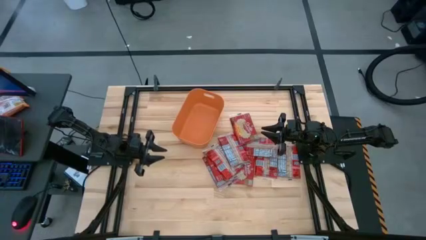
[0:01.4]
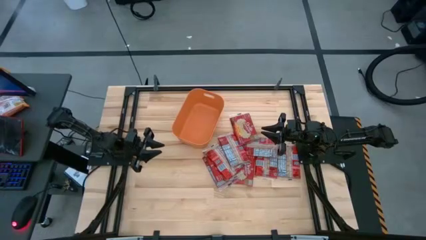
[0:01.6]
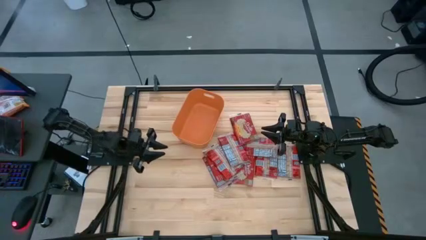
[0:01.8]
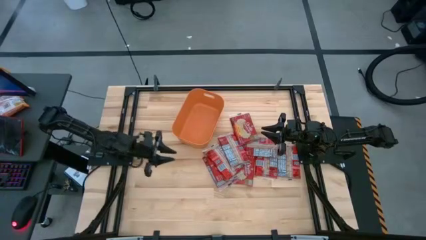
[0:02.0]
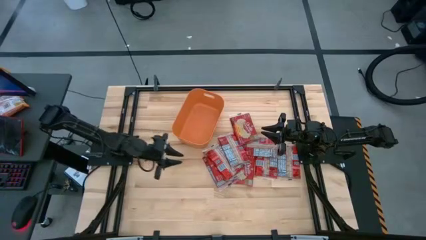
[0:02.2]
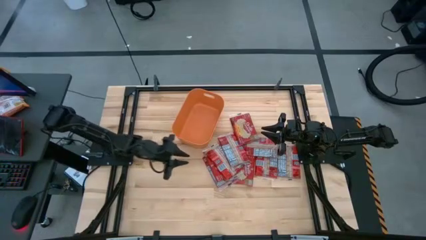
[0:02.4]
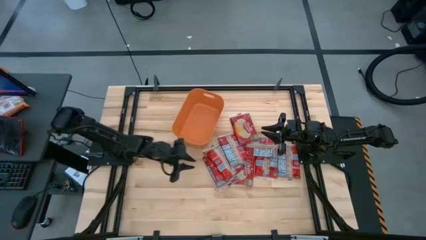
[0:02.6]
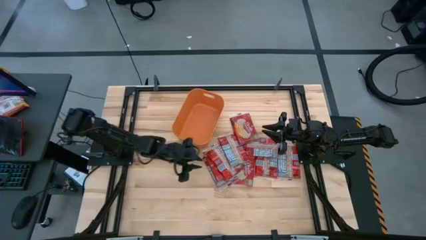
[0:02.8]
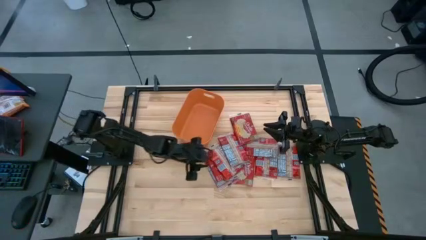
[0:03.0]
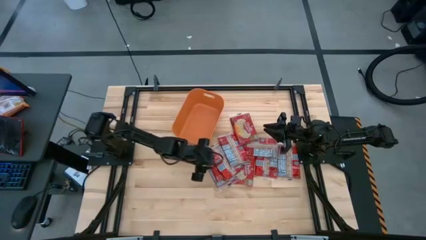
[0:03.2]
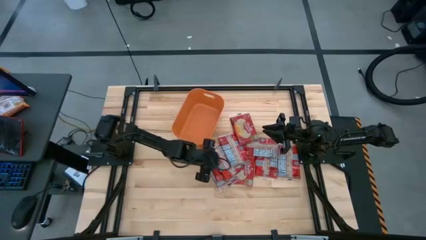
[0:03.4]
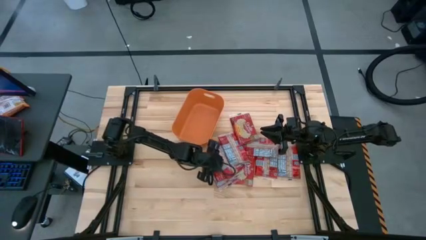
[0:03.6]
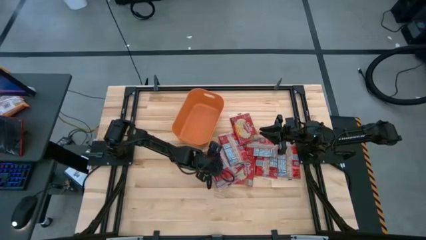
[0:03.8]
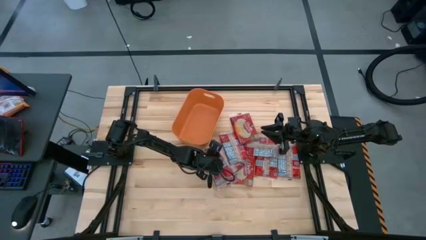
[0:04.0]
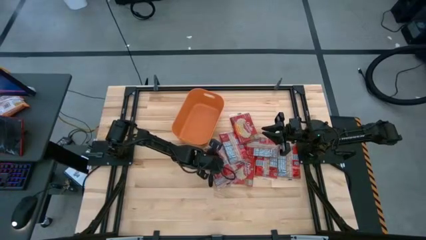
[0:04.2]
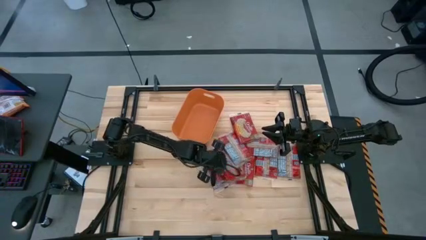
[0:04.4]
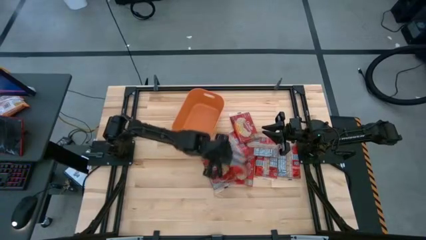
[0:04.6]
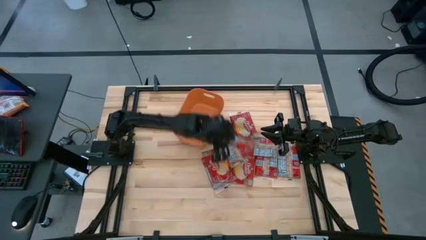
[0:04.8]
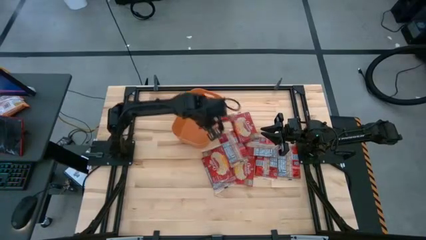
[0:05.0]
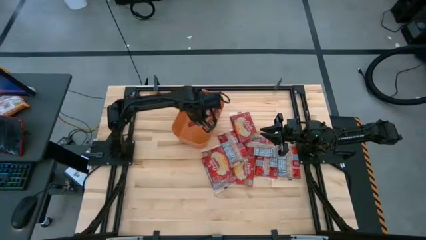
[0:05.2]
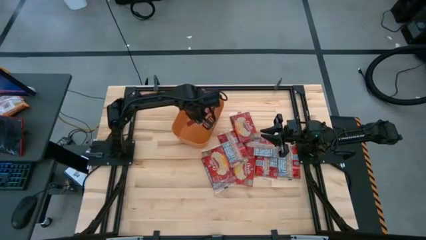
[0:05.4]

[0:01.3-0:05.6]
Task: Sort popcorn bags into baskets
Put the red popcorn pack into the orange bin

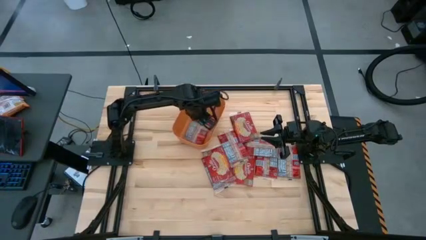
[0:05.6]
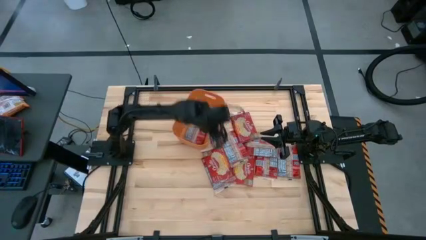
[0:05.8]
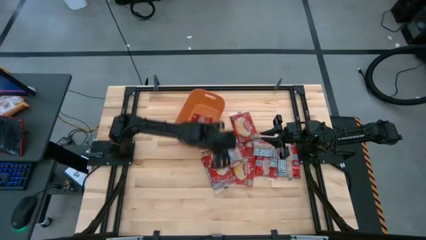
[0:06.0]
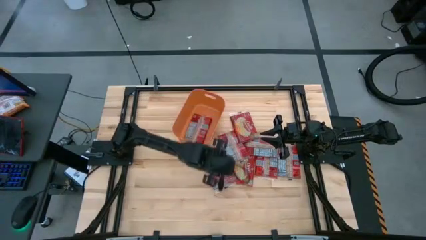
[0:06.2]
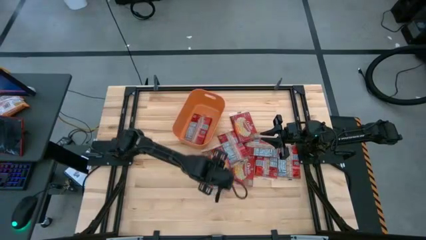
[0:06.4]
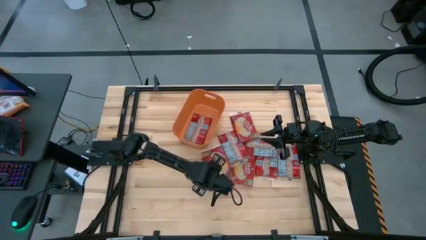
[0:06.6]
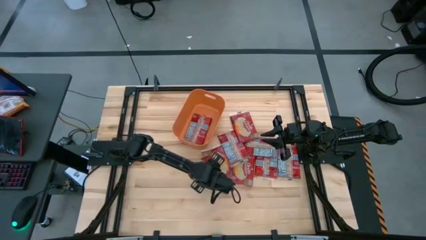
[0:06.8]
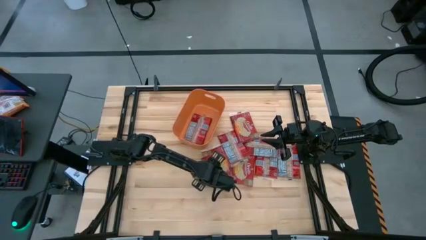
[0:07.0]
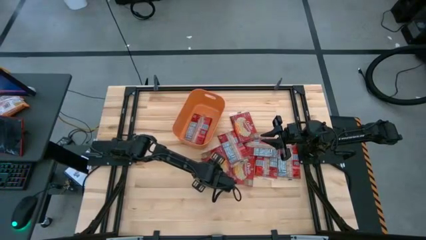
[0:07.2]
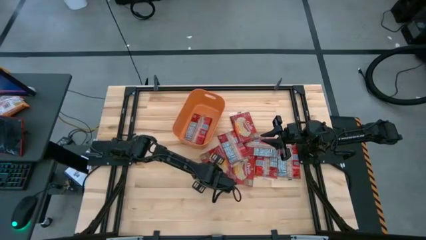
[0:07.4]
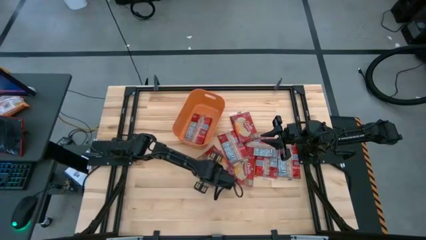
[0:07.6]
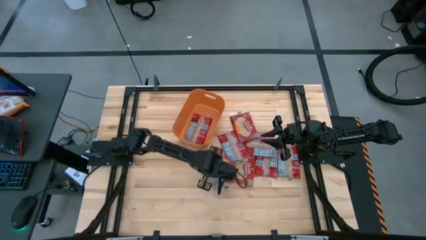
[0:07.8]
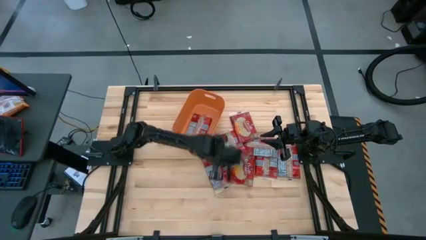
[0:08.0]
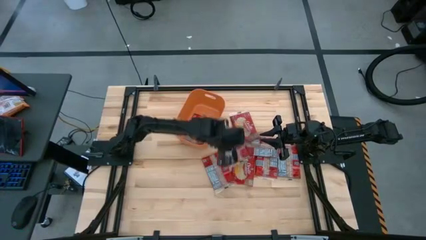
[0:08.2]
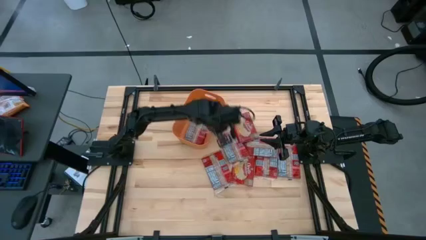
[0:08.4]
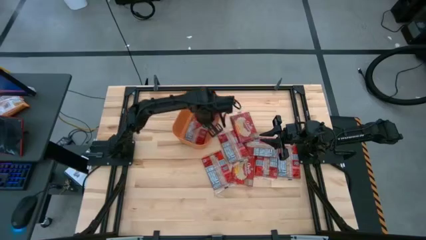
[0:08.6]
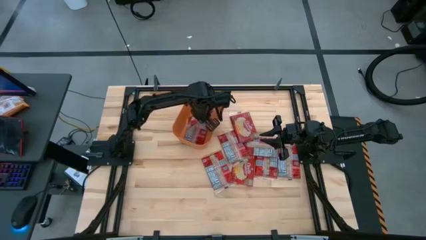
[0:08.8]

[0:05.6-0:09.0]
Put the red popcorn pack into the orange bin

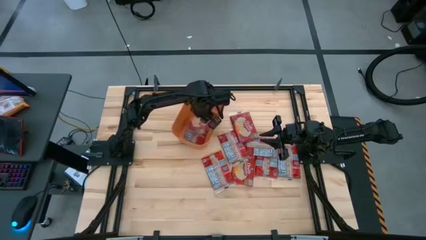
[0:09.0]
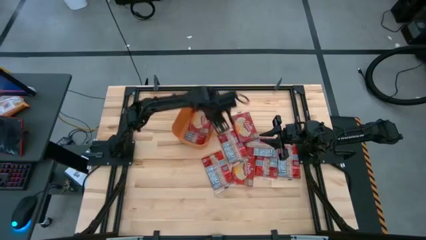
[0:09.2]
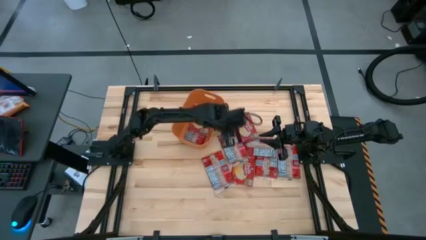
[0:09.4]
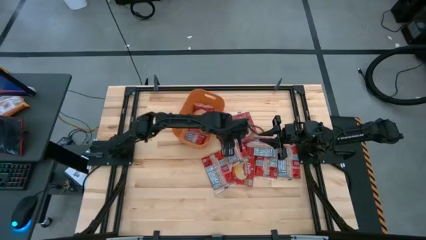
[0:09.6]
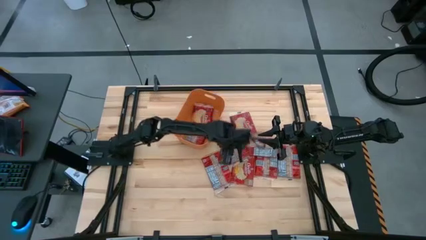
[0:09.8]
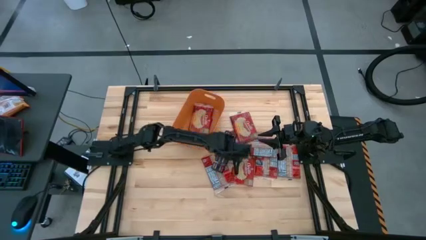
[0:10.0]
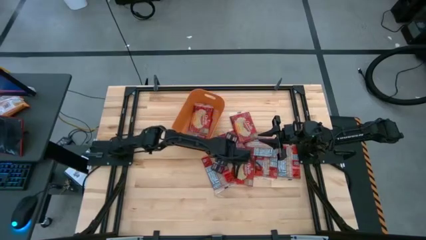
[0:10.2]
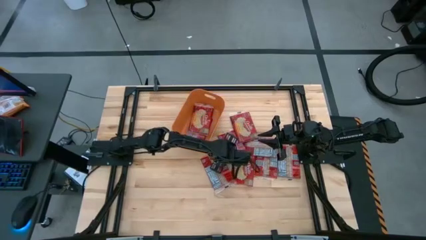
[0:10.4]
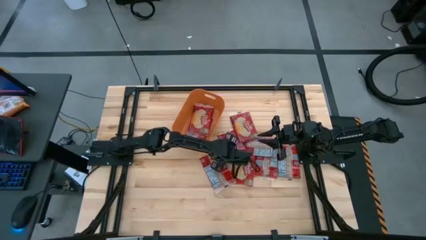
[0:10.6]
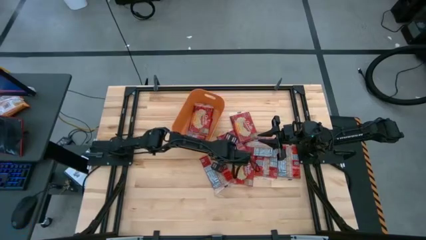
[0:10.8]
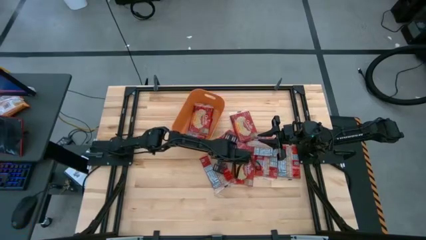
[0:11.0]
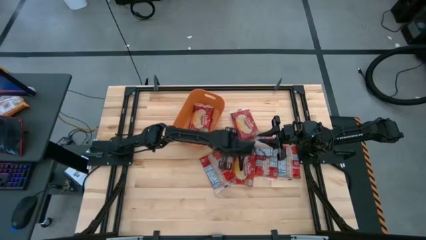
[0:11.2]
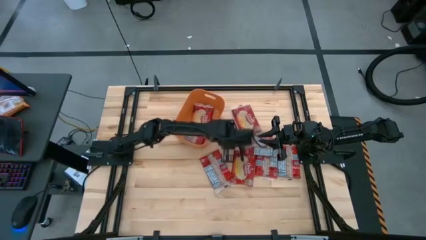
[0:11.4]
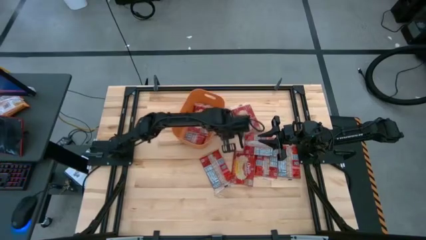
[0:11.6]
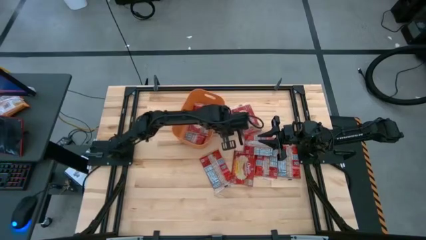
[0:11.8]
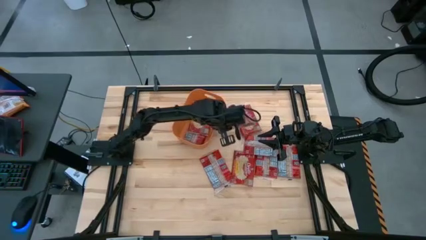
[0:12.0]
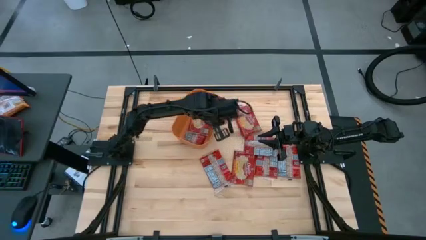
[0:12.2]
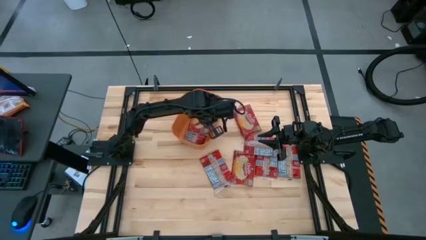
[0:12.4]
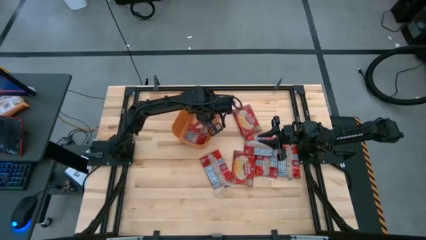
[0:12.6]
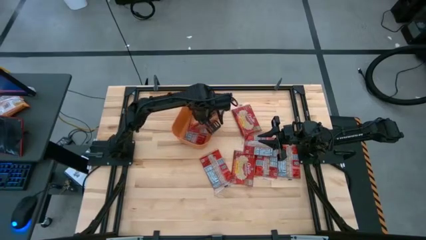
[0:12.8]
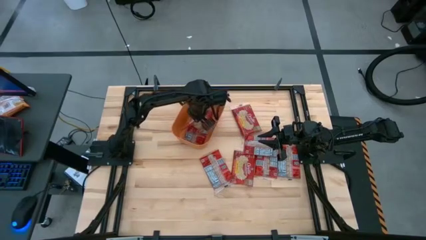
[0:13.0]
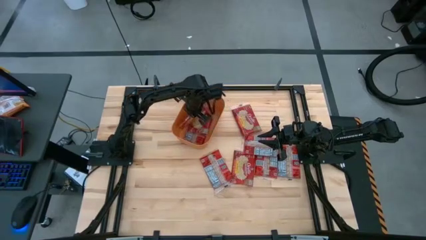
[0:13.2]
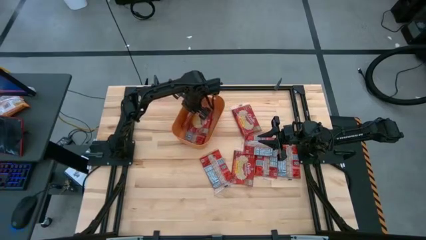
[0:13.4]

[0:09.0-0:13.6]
Put the red popcorn pack into the orange bin

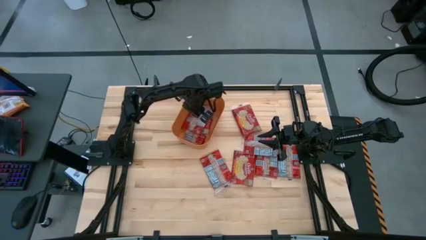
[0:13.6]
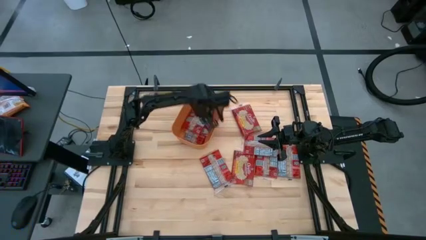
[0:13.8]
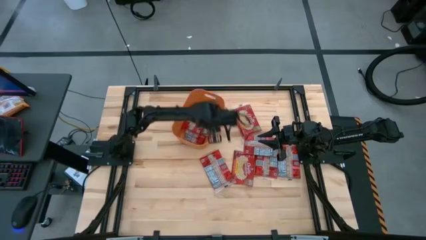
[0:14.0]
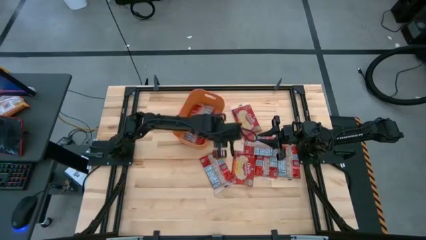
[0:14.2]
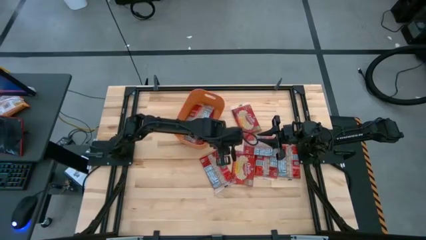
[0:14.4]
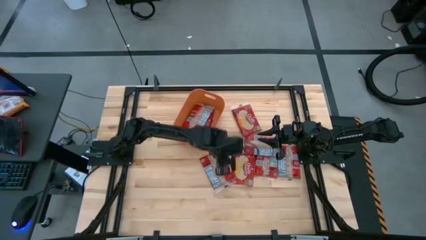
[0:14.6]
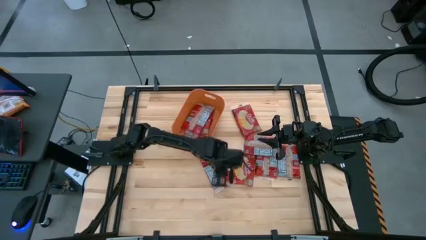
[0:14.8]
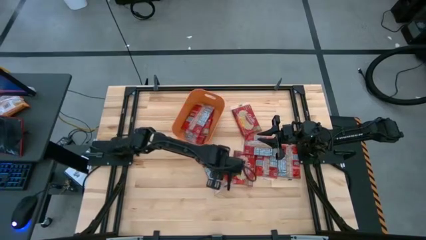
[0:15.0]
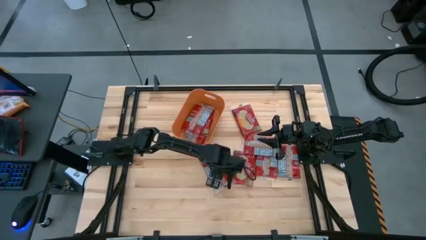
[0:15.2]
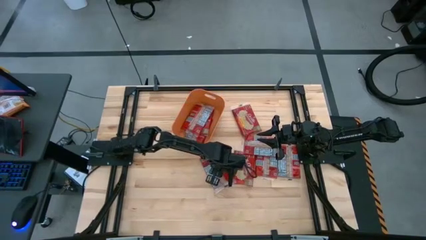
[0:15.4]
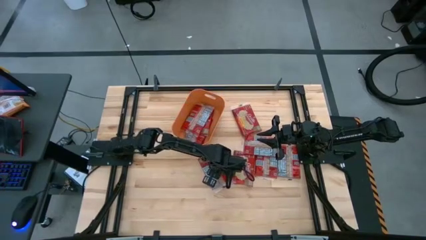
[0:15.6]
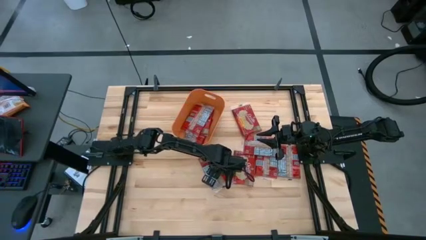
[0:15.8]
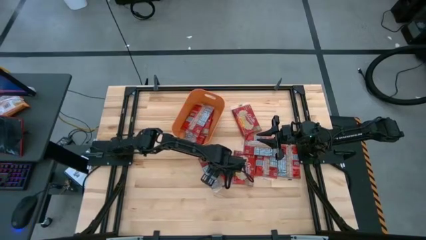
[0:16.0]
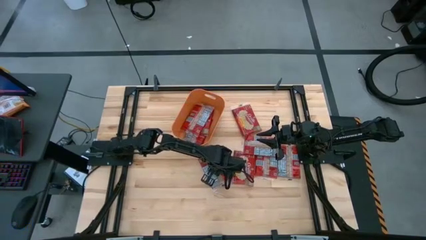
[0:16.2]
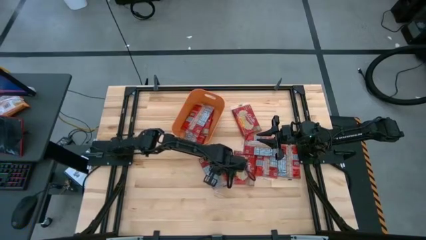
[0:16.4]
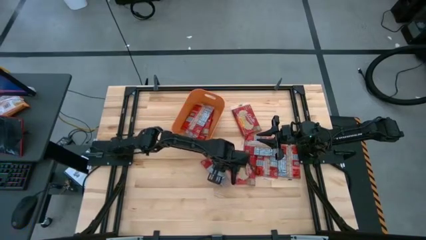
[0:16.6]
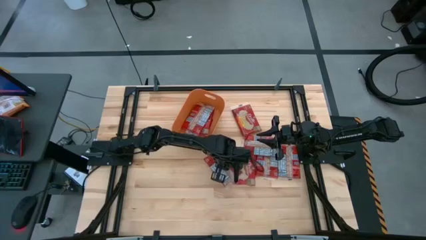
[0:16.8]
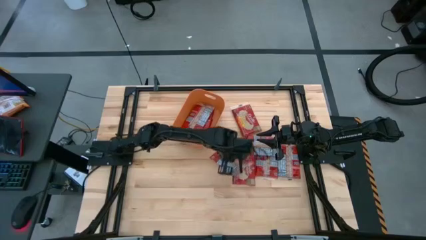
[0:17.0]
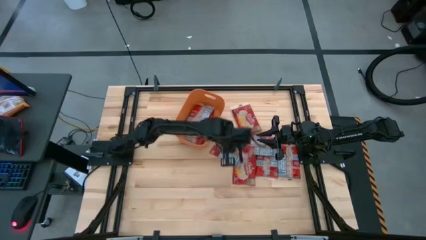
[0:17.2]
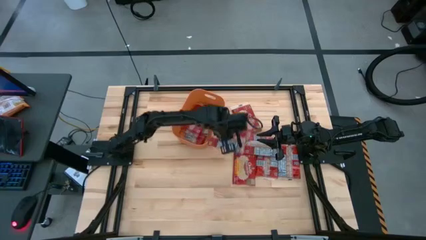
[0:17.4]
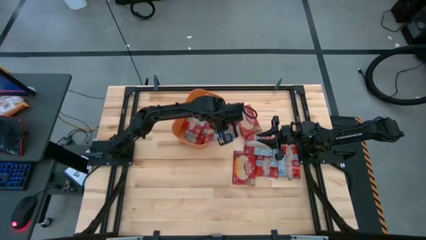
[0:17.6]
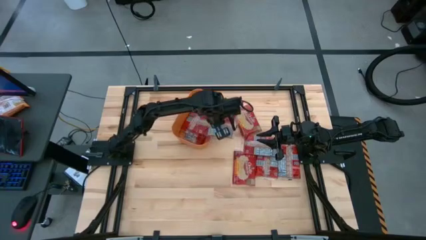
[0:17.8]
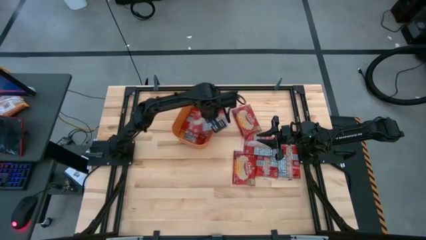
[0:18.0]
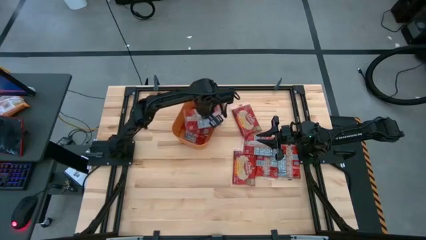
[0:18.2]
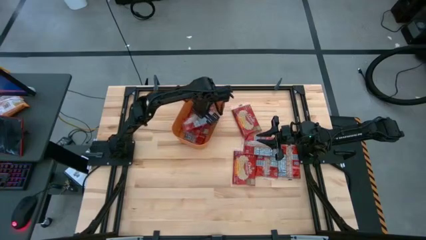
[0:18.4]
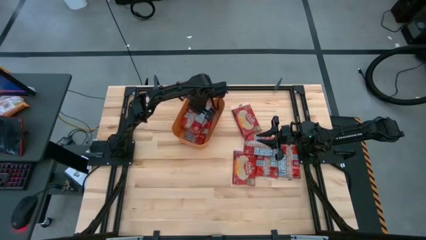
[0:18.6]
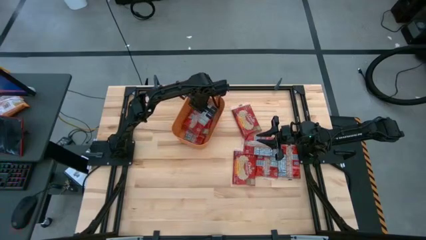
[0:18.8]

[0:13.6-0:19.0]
Put the red popcorn pack into the orange bin
